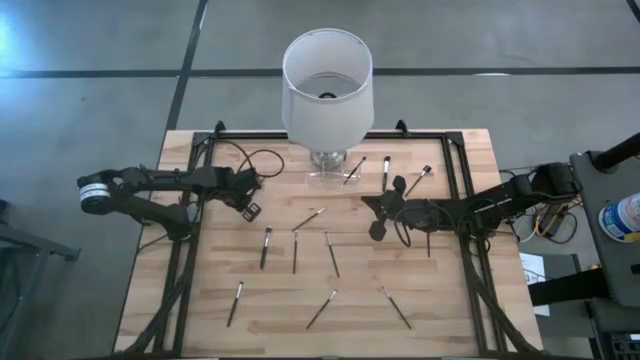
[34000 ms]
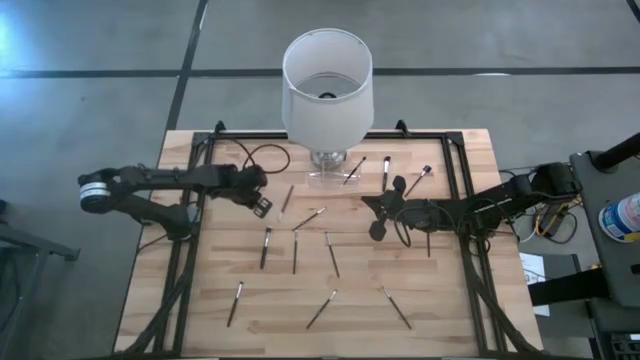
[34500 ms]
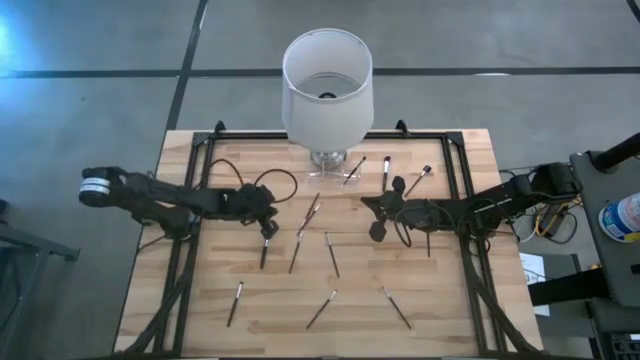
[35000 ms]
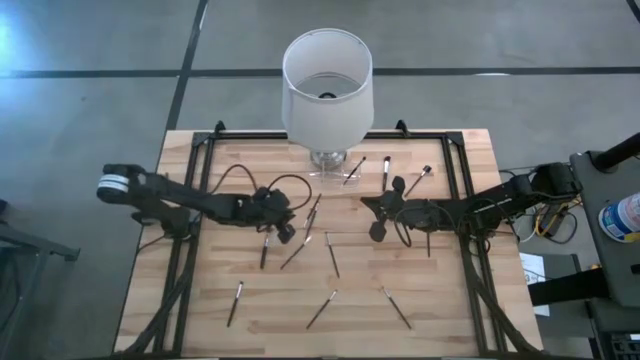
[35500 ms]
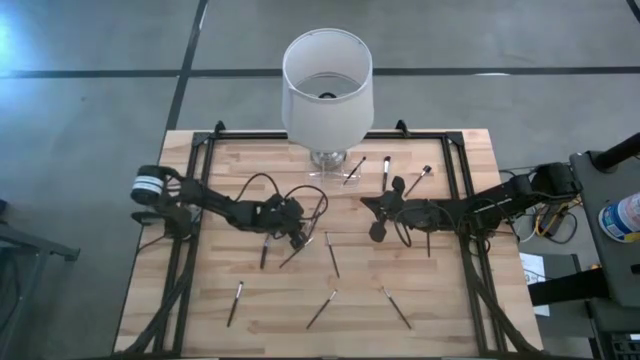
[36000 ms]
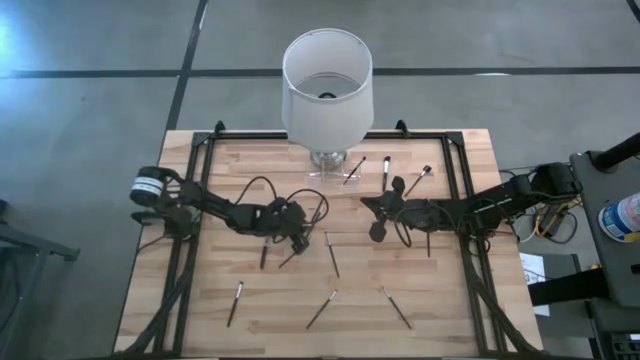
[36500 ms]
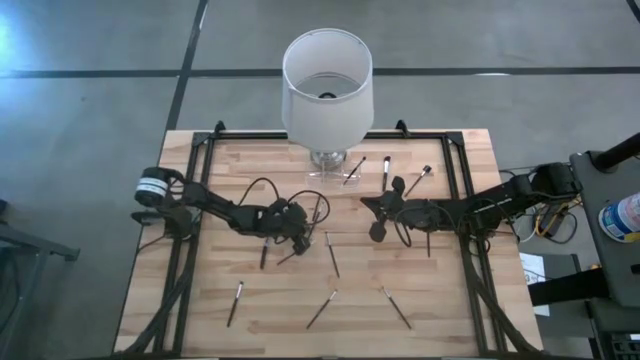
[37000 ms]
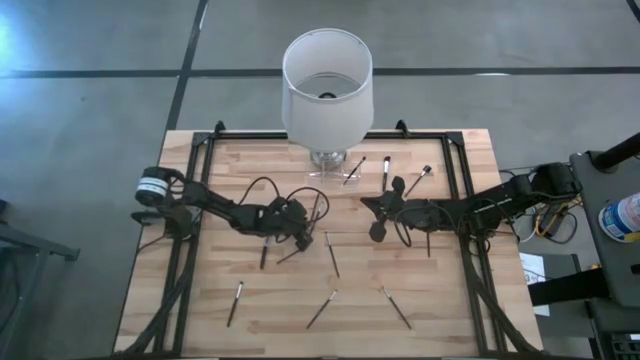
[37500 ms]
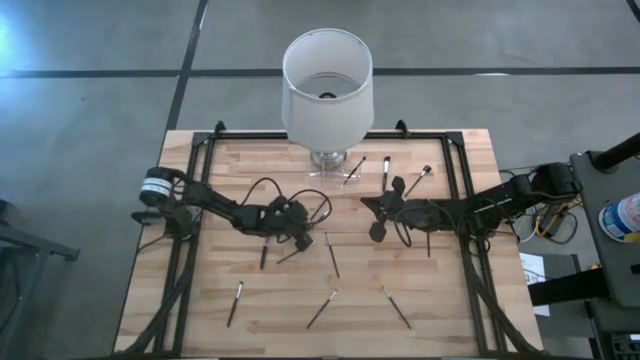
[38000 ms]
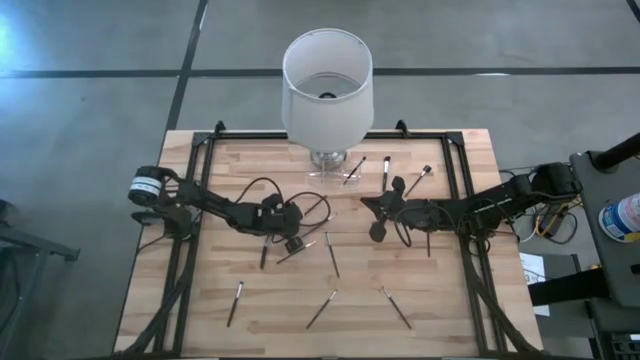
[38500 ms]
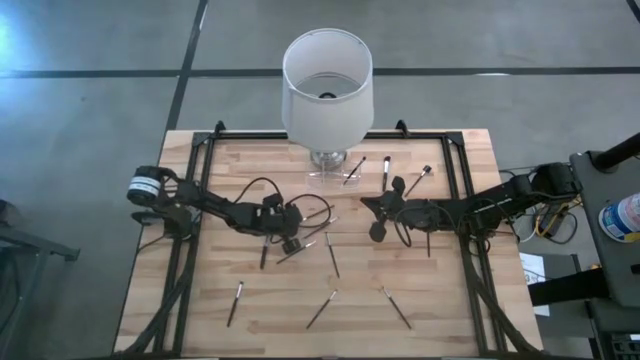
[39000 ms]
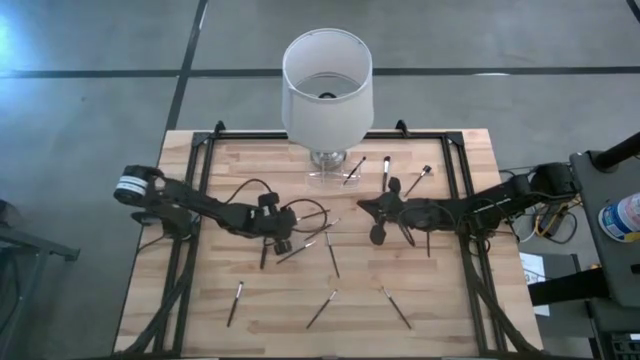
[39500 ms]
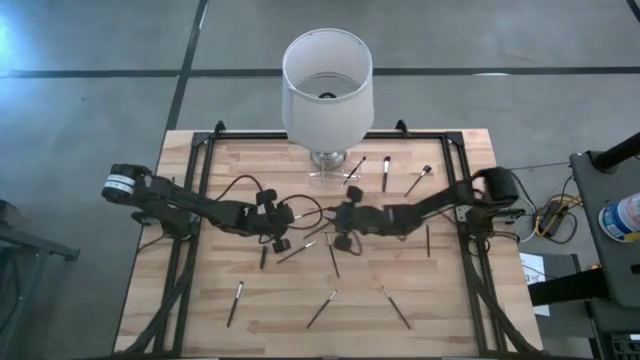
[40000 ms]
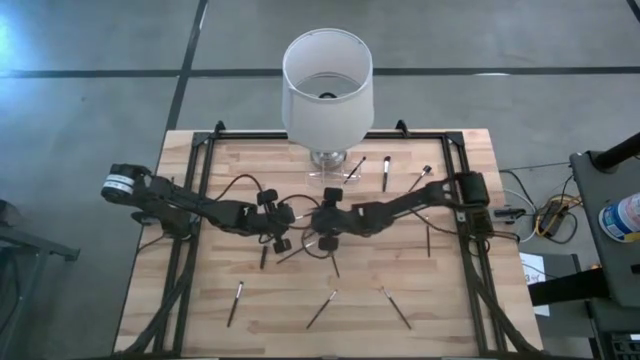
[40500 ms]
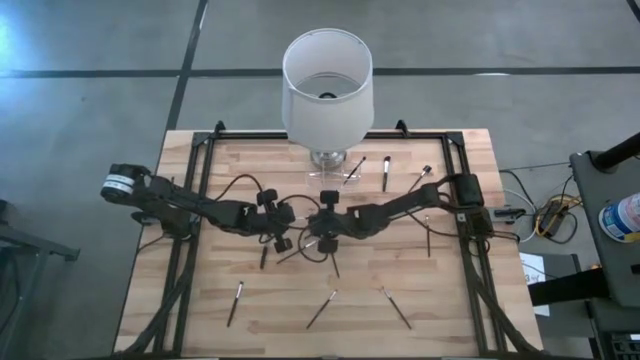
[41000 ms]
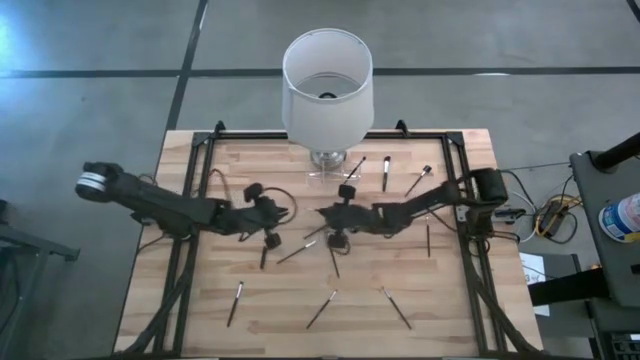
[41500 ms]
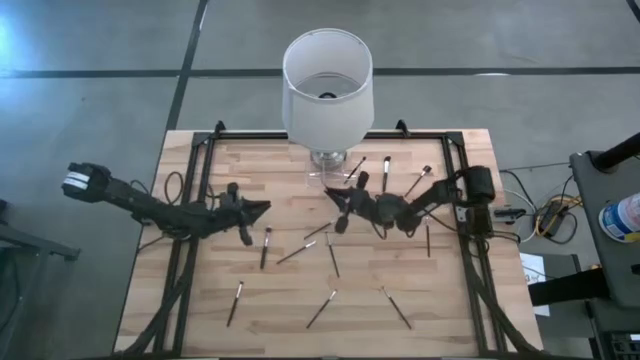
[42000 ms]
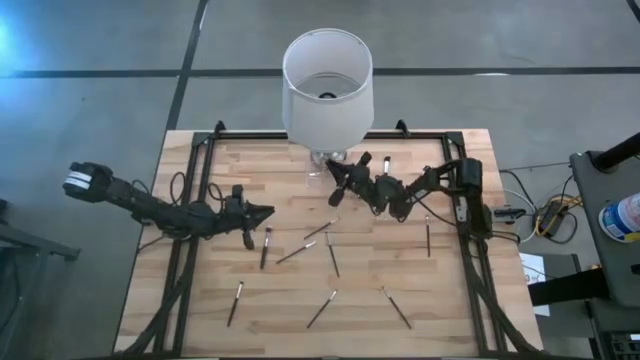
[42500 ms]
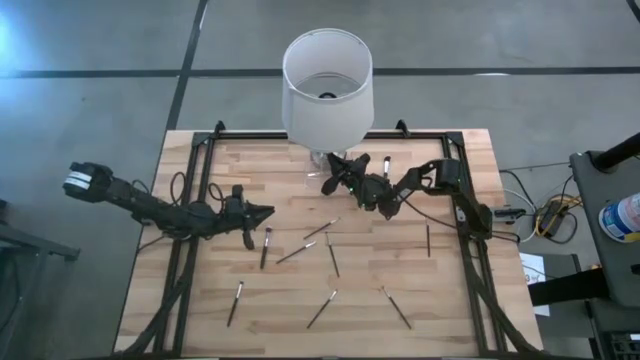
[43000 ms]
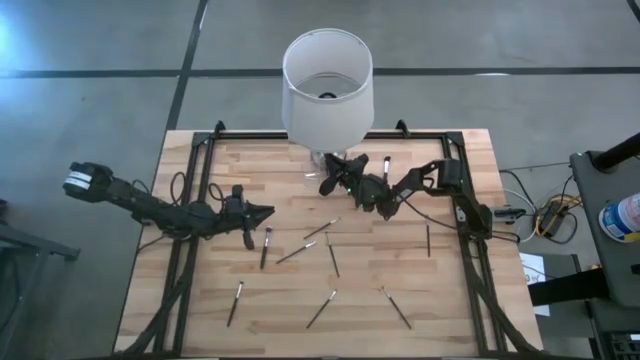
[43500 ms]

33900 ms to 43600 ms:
Task: Put items in baskets/containers
Put the black eyeshadow brush into the transparent organizer

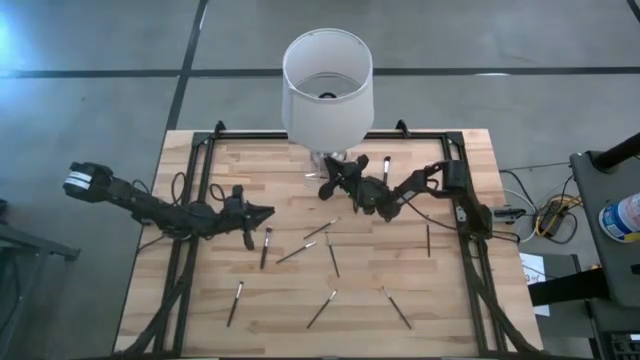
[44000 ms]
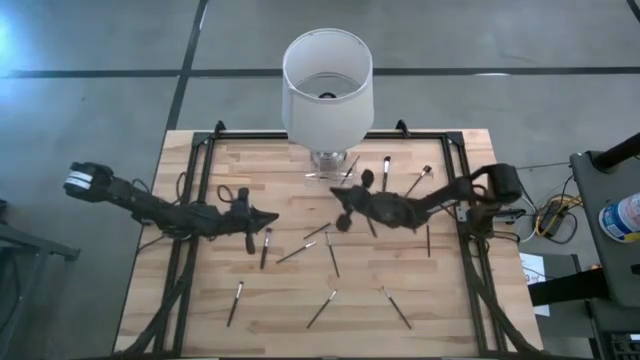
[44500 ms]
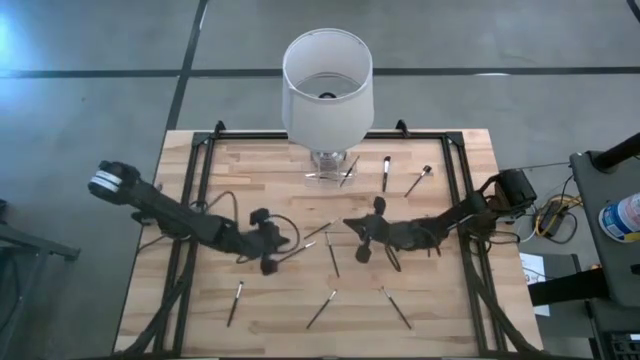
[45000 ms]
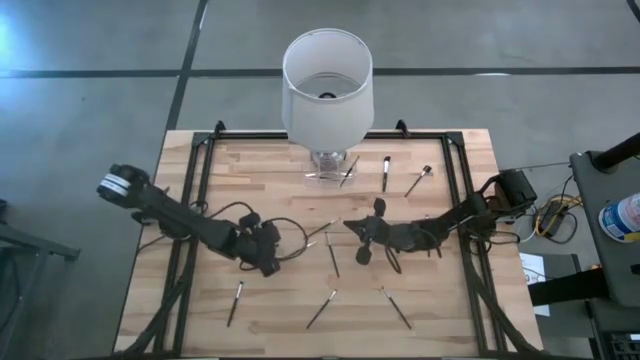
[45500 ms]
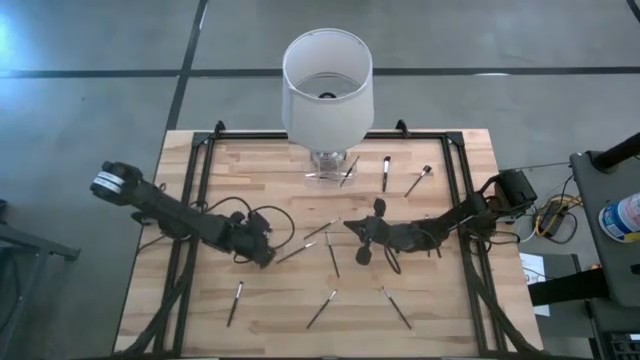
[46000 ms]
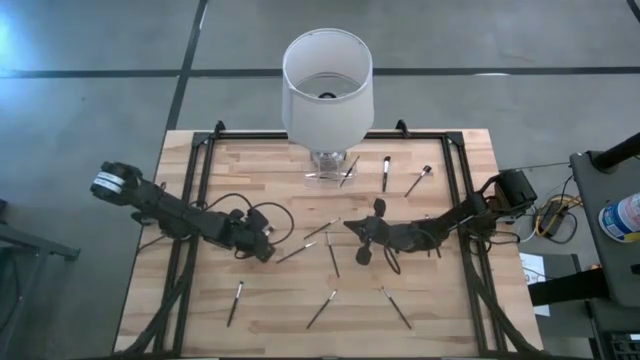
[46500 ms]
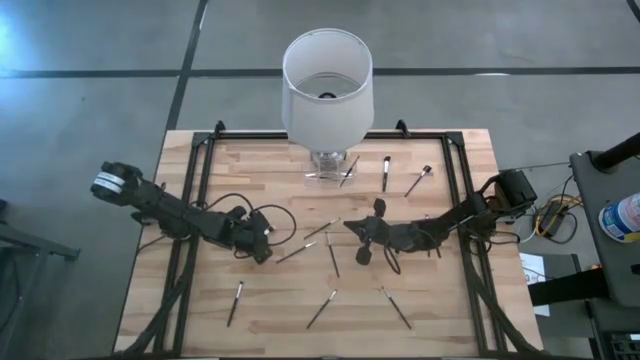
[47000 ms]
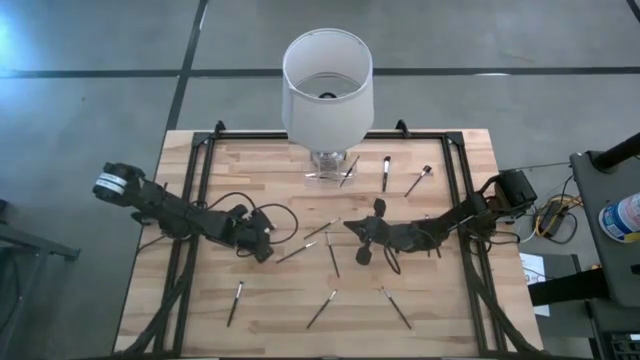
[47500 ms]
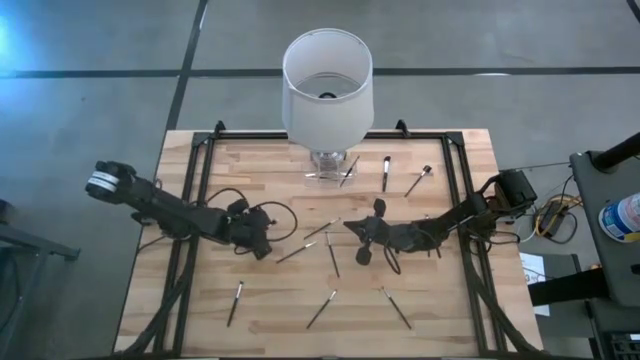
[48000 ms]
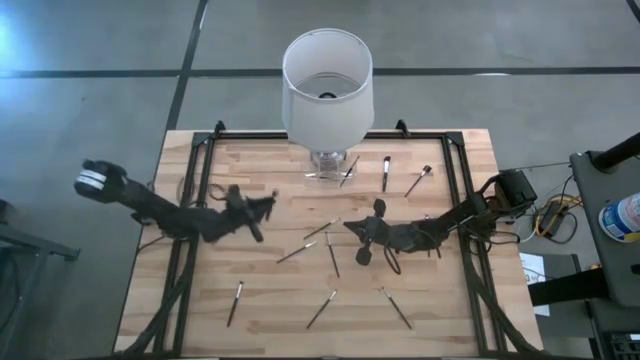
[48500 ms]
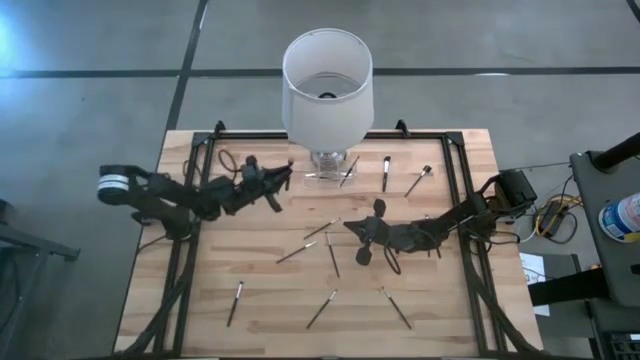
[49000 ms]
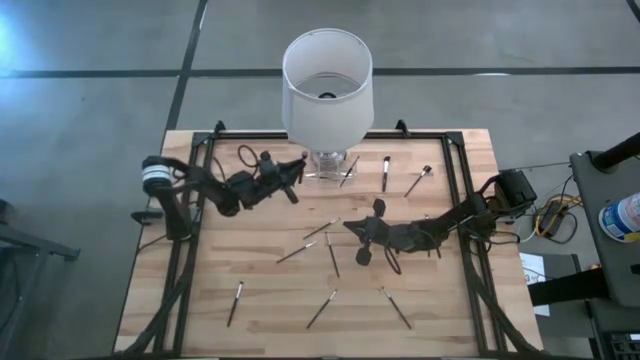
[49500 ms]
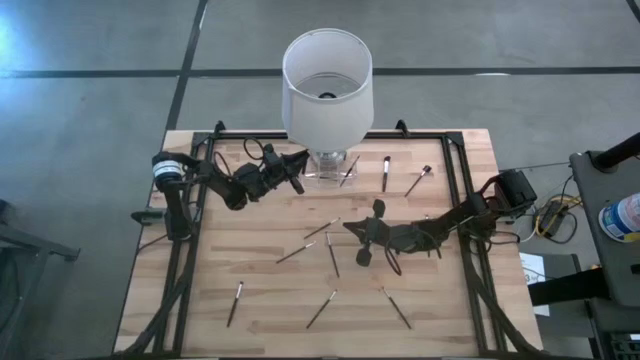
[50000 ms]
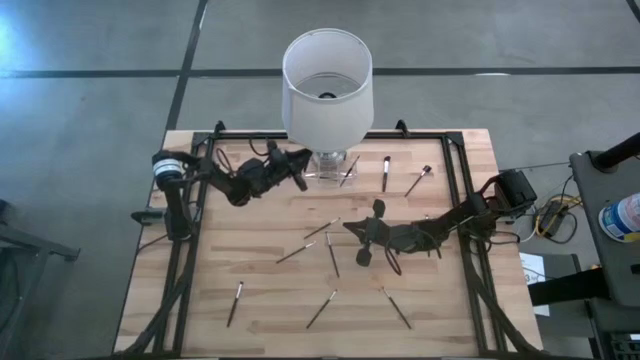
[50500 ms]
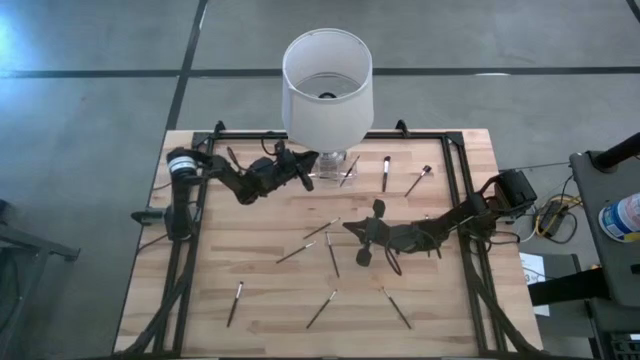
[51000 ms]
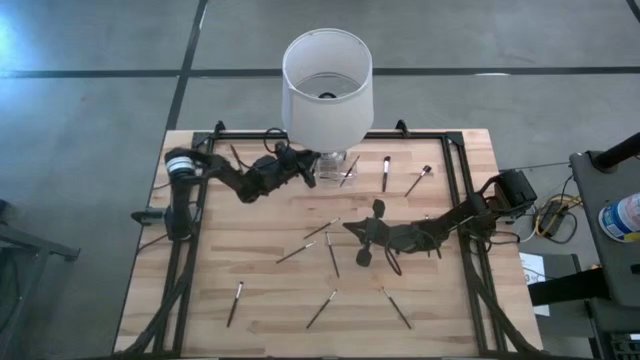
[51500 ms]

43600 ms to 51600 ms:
Put the black blush brush into the transparent organizer

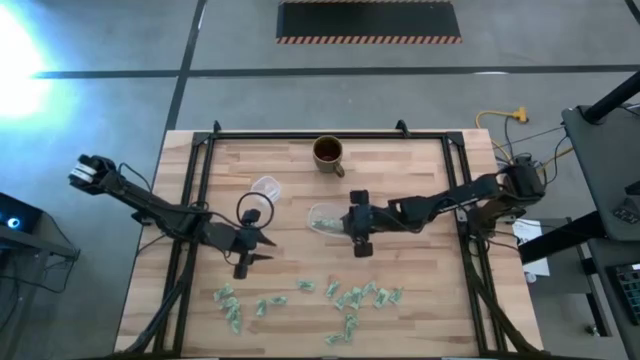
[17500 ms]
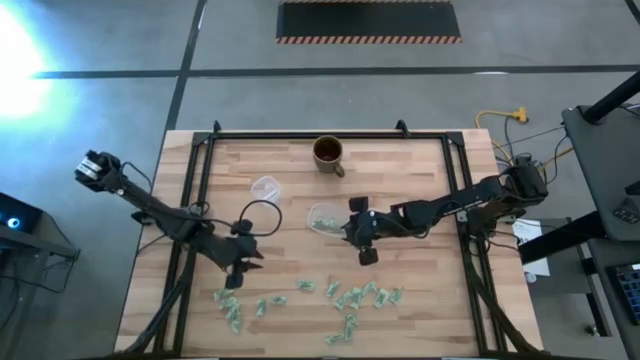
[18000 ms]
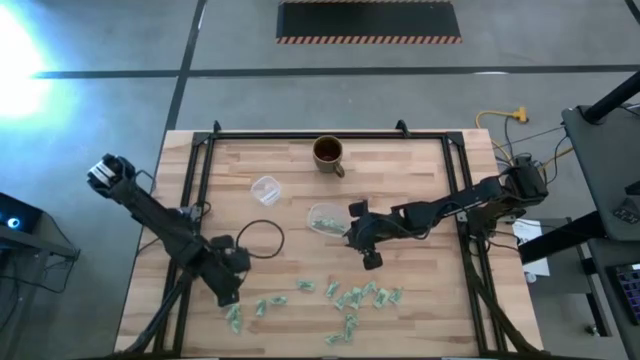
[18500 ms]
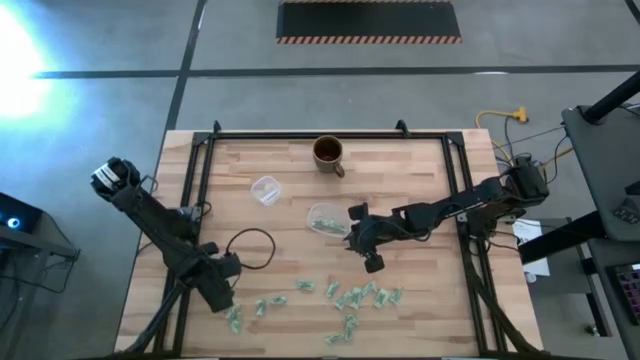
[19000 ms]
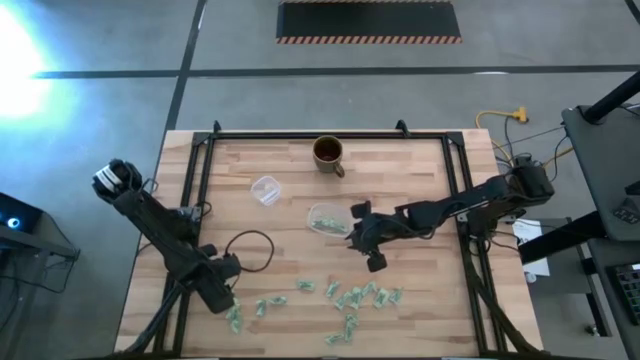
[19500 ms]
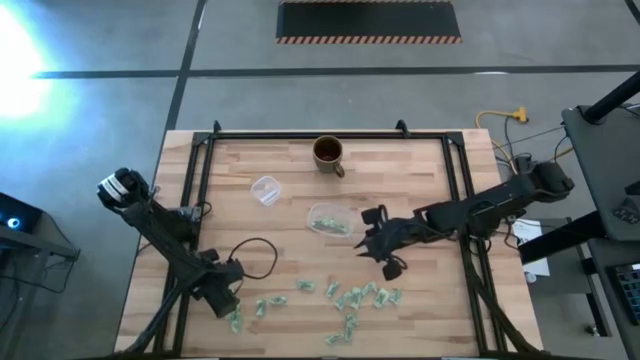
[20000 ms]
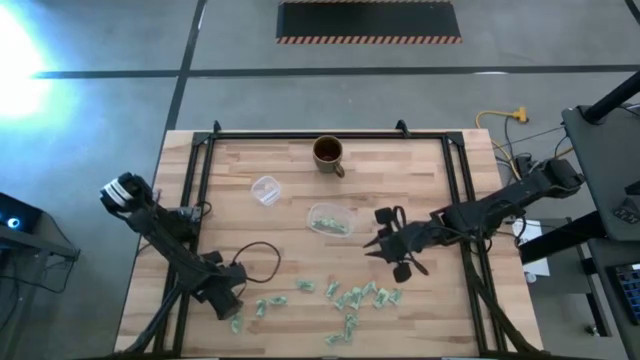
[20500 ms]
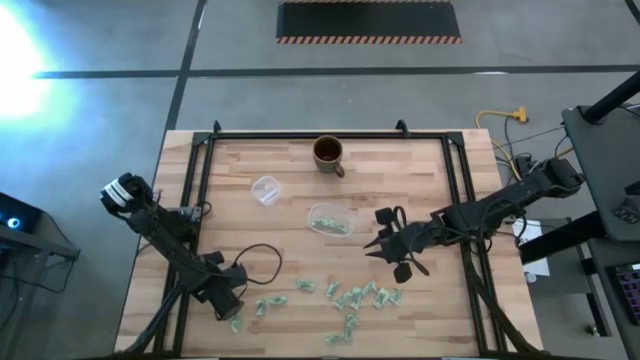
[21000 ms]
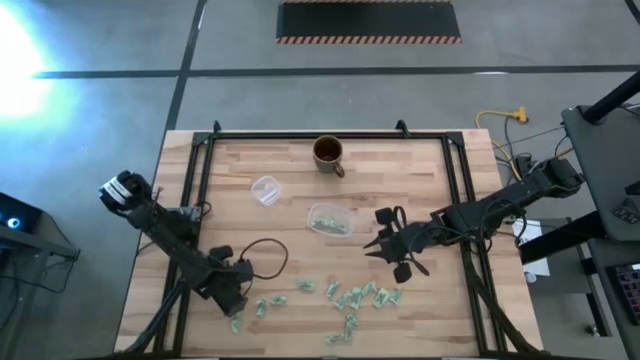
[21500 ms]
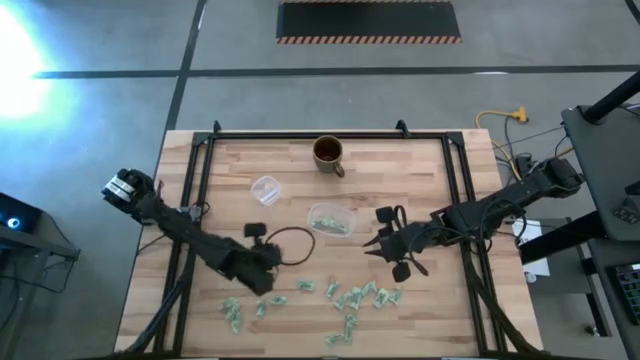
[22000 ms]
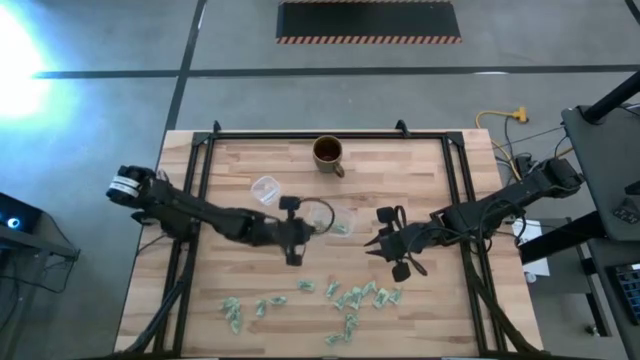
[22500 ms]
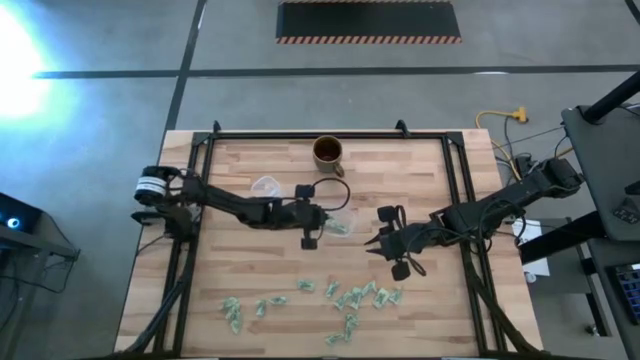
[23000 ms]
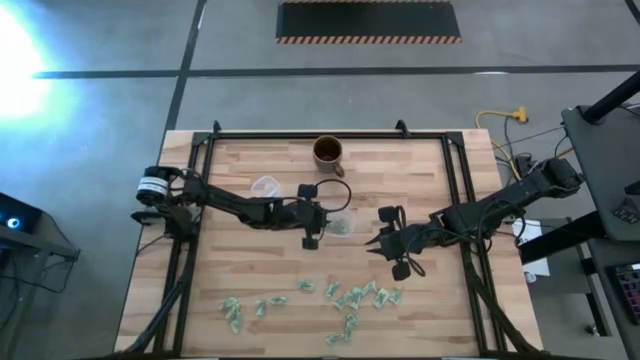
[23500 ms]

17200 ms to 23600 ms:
Task: Pick and place Stevia / Truvia into bins
Put the green stevia packet into the transparent container
